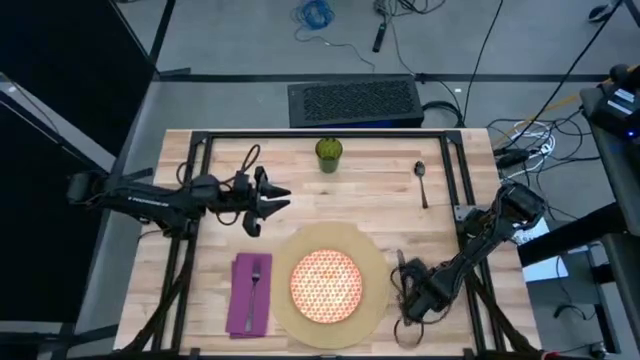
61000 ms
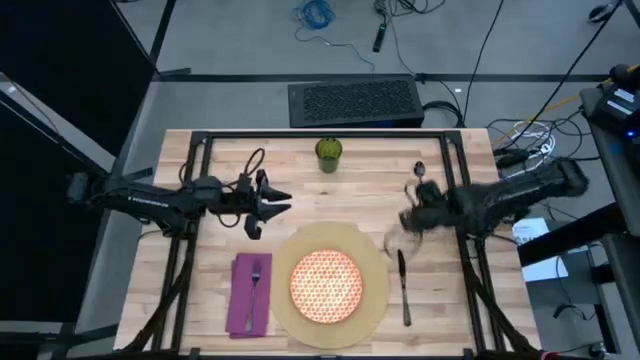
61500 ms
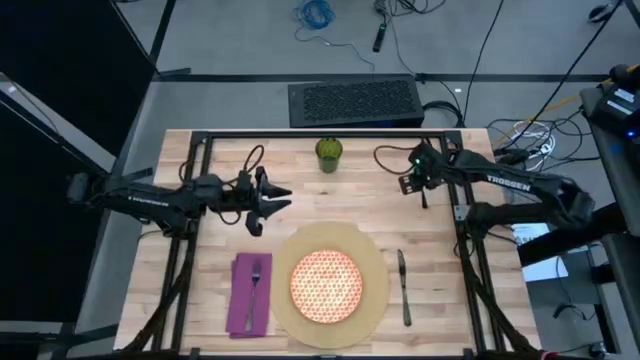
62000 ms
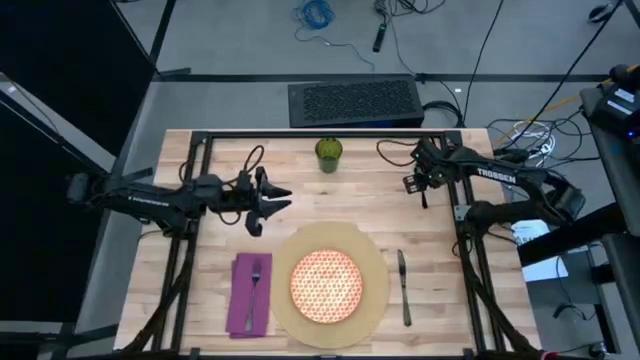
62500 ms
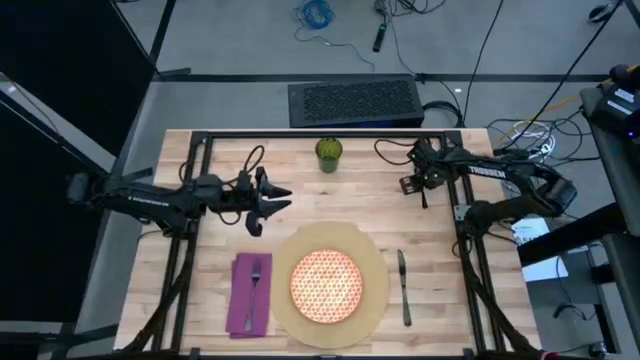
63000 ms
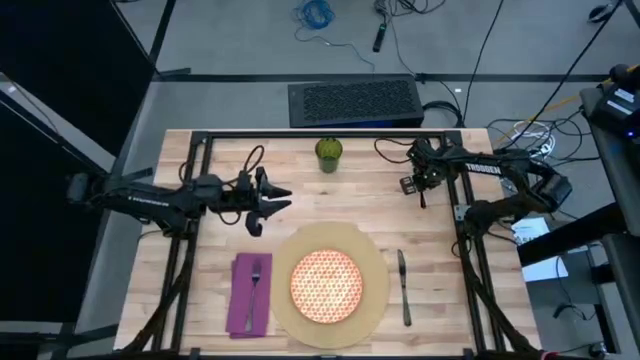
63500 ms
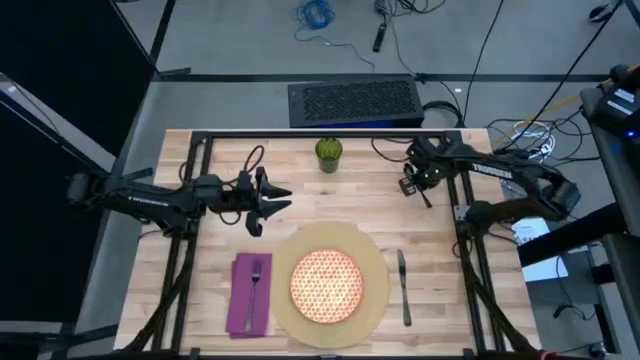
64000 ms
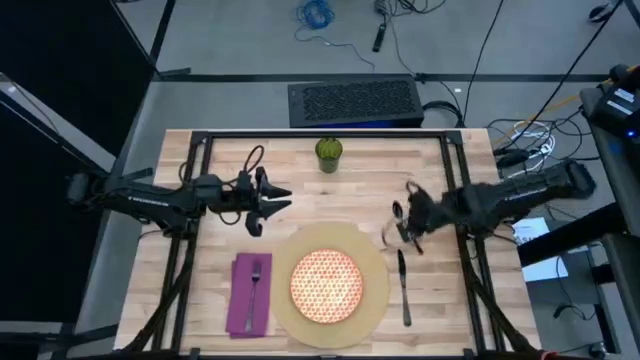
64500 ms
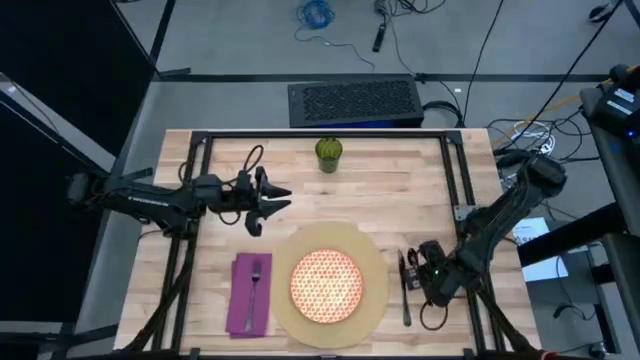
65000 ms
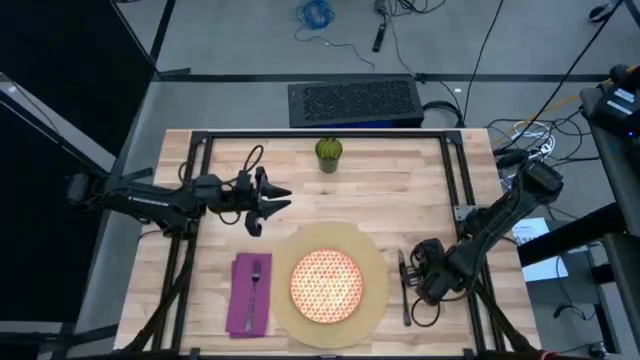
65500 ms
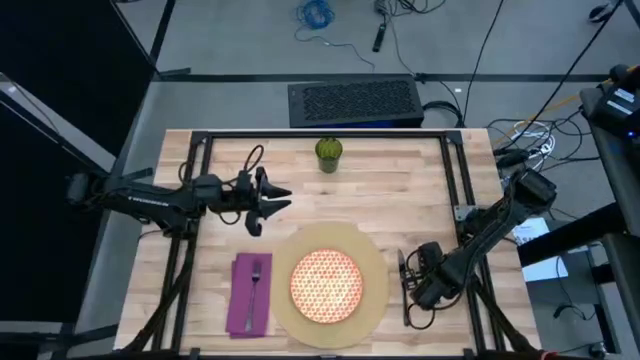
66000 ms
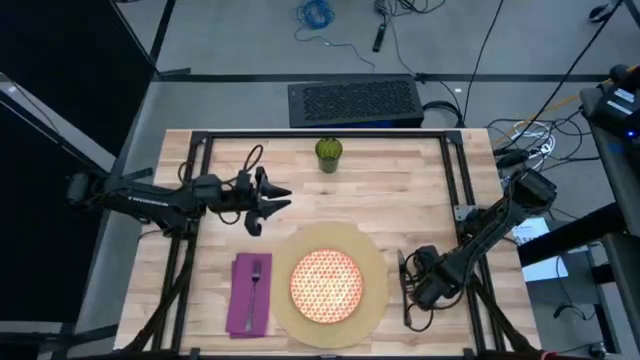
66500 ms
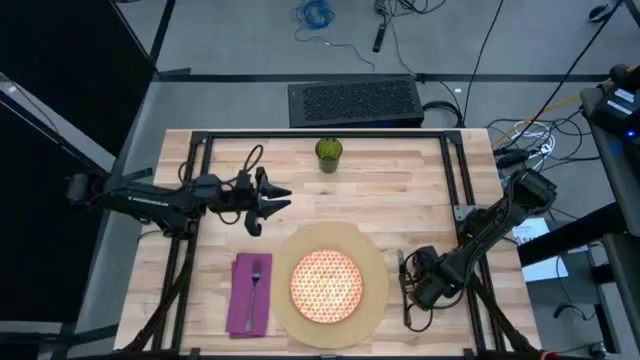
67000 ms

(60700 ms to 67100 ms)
Task: Set table place
Move the black spoon to the right of the black knife

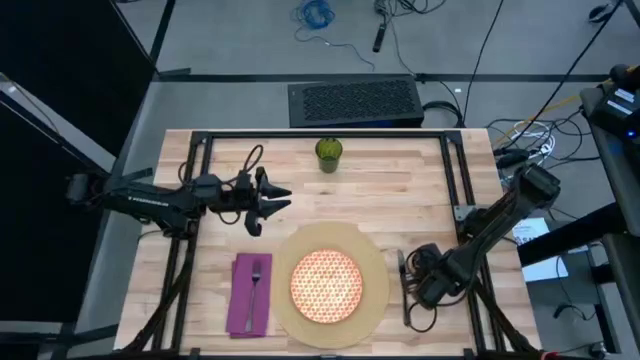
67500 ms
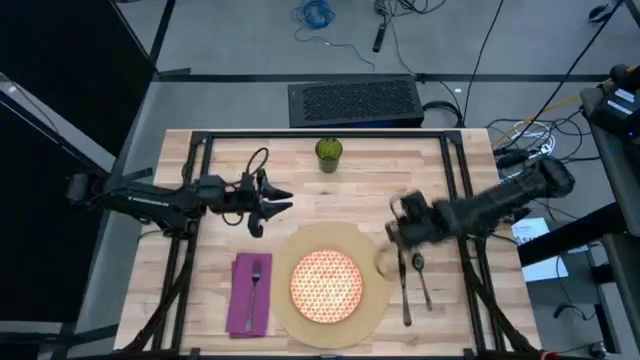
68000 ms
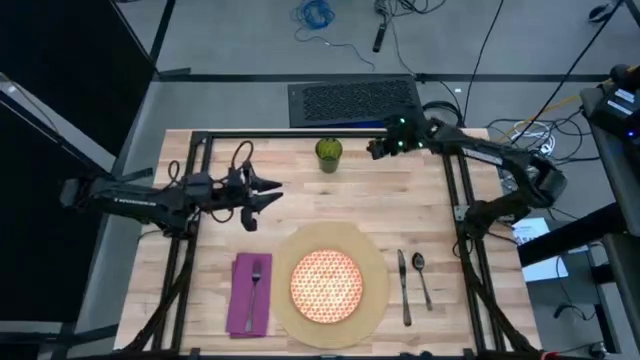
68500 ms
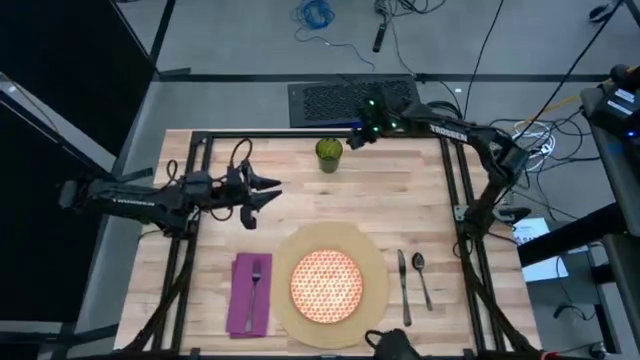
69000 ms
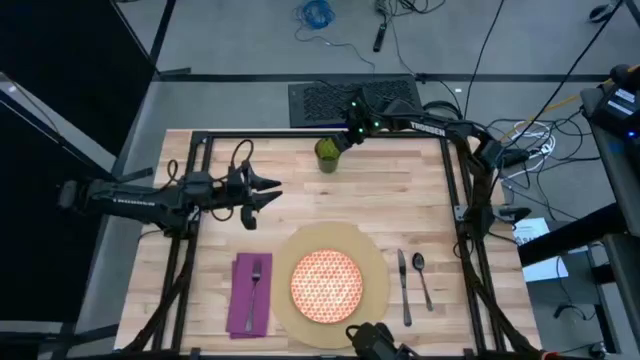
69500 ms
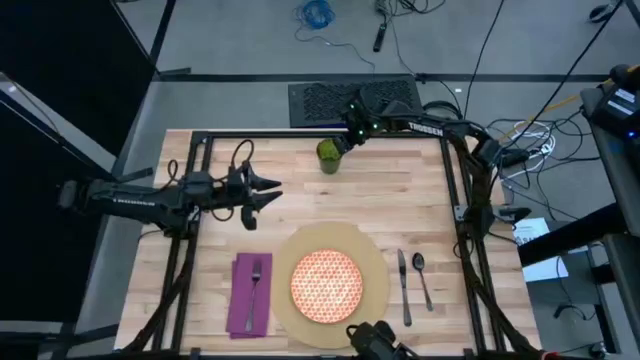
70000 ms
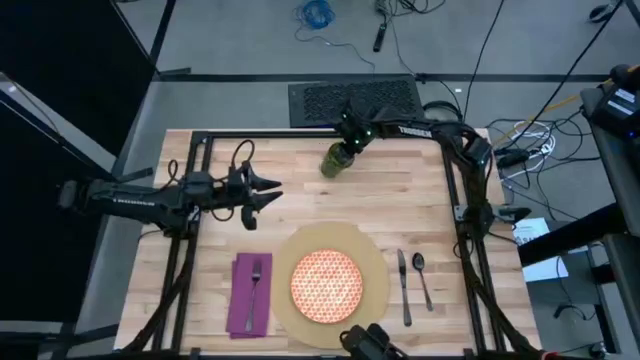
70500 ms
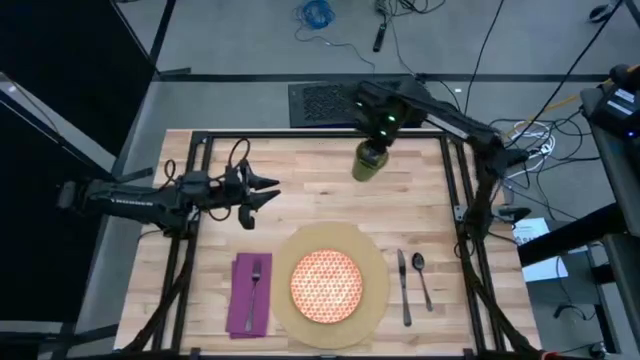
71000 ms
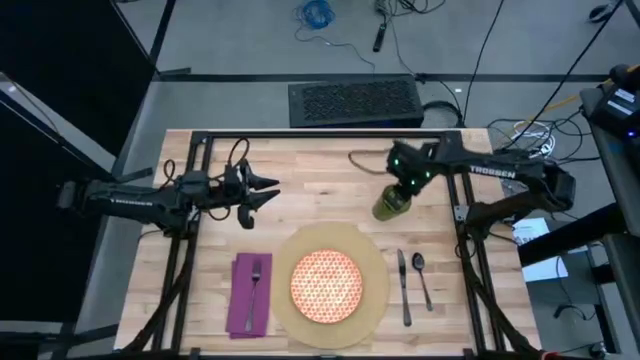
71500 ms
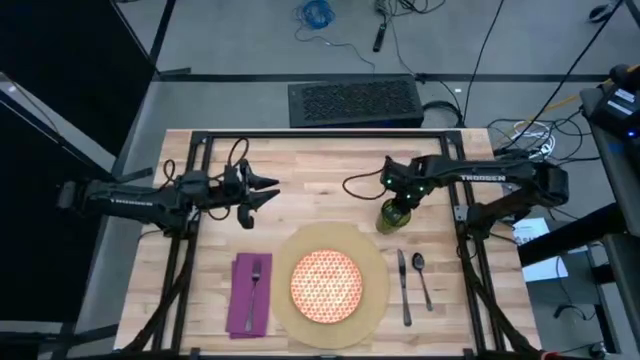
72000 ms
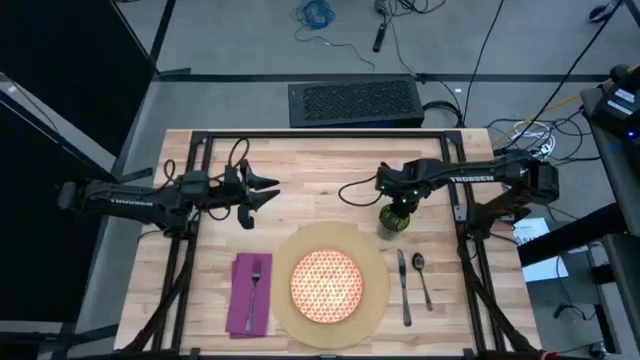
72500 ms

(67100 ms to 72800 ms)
Move the green glass to the top right of the brown placemat

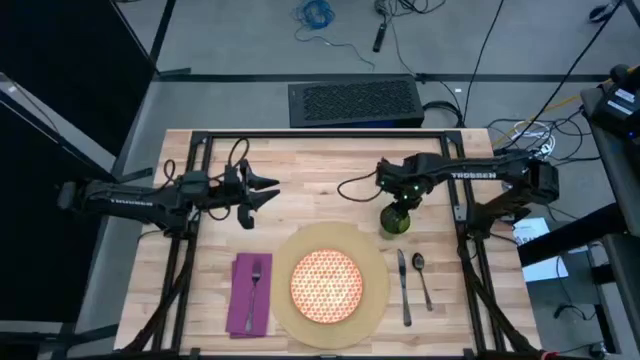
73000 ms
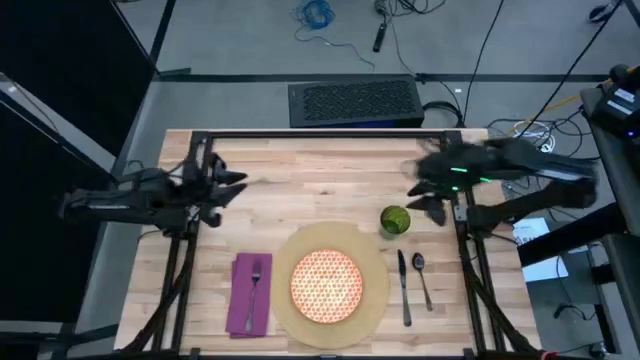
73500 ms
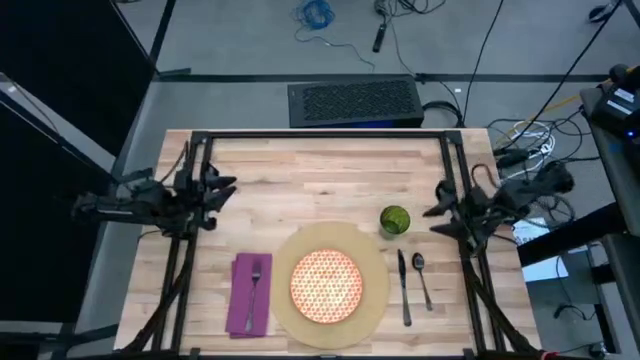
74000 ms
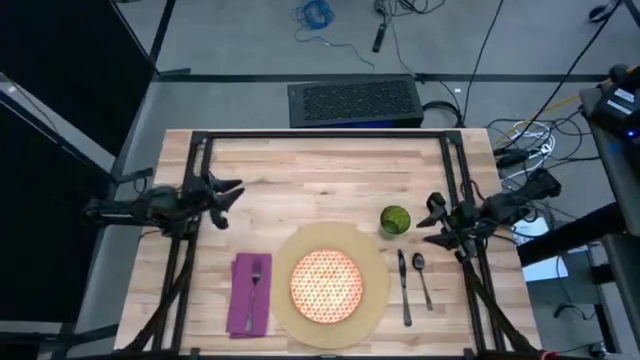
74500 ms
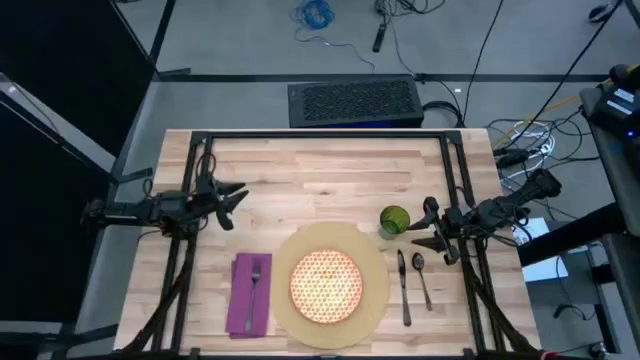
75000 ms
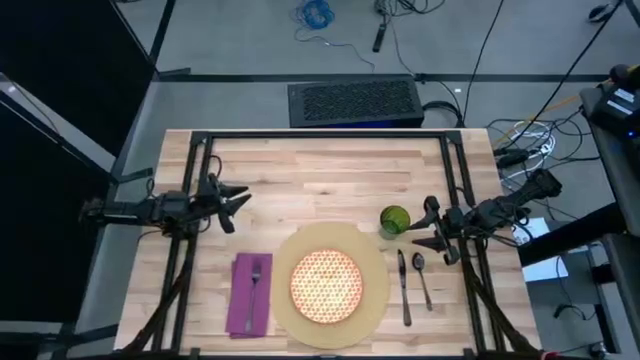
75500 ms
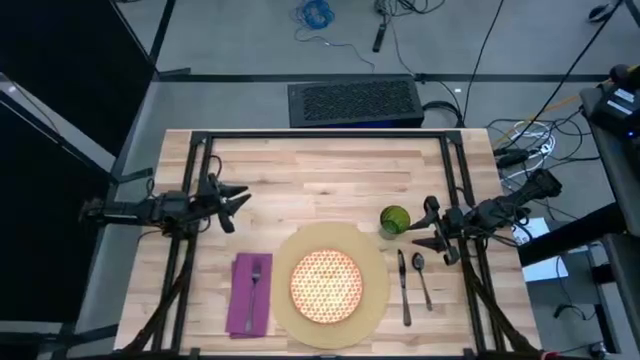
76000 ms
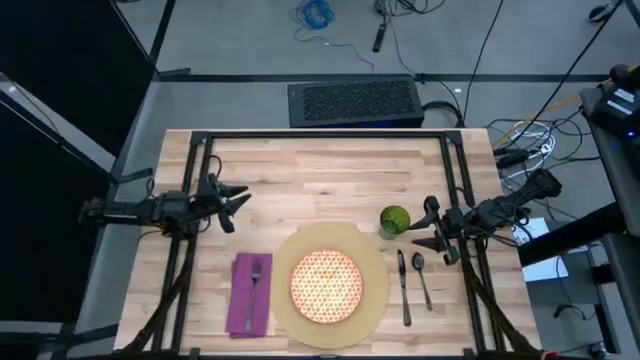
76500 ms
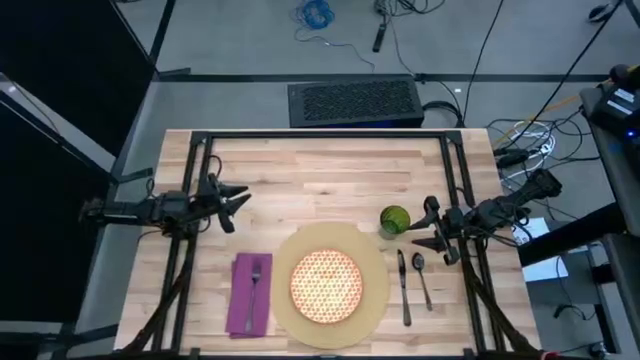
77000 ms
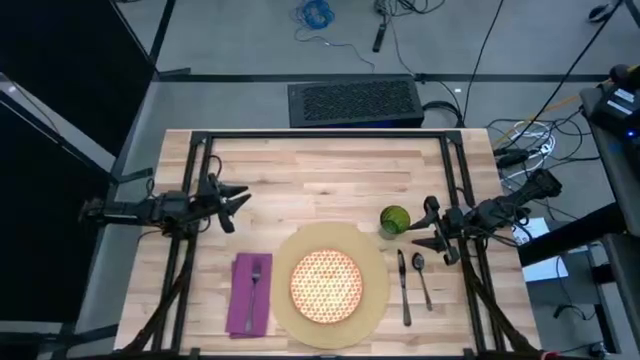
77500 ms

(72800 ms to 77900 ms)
Return to Home Position

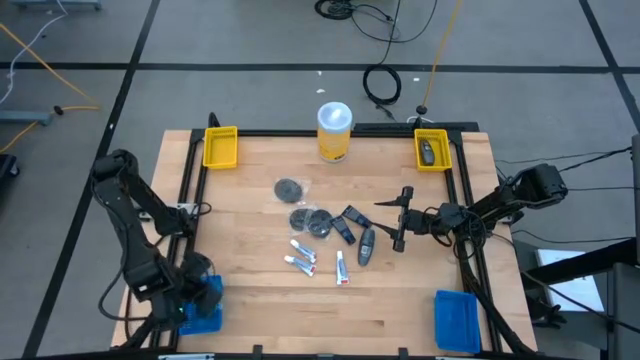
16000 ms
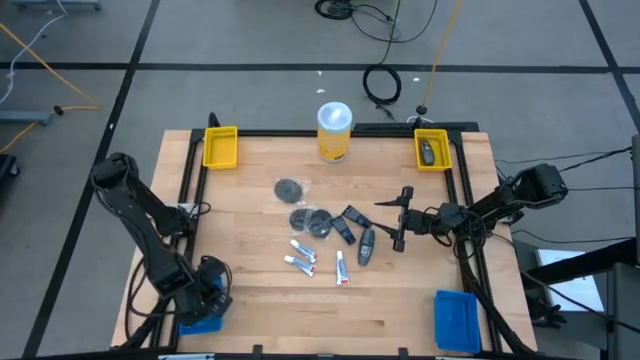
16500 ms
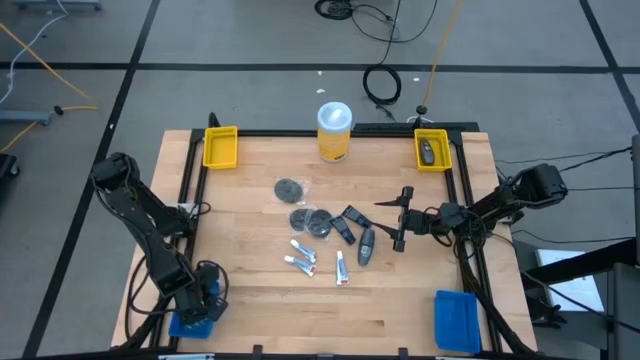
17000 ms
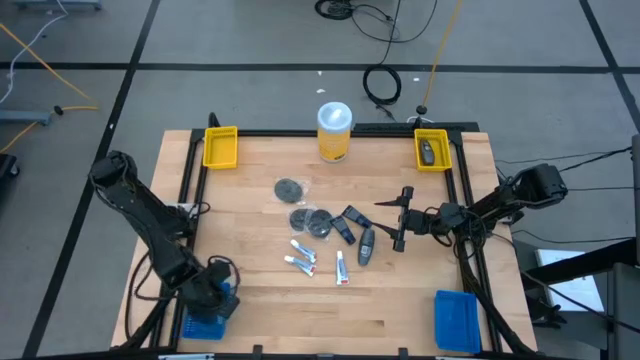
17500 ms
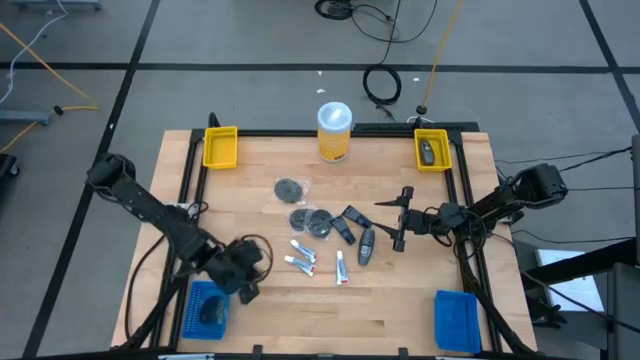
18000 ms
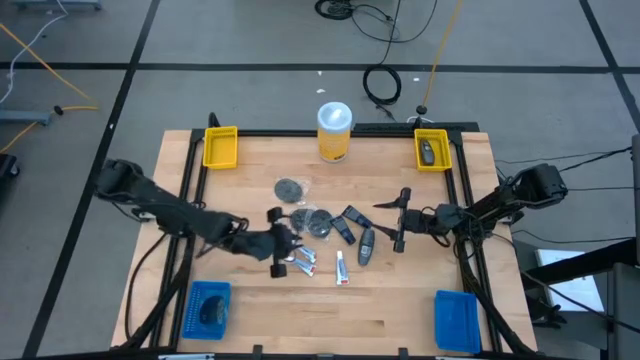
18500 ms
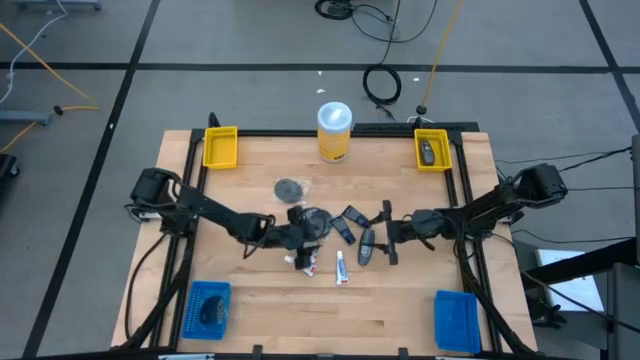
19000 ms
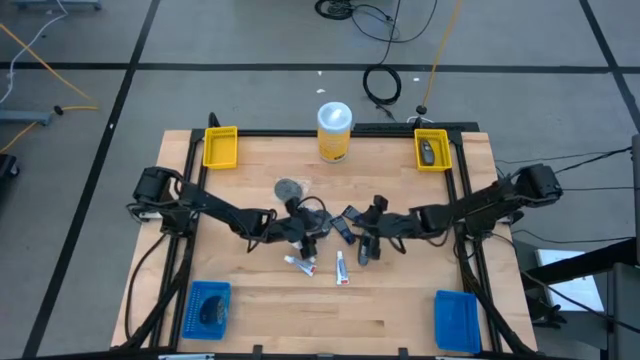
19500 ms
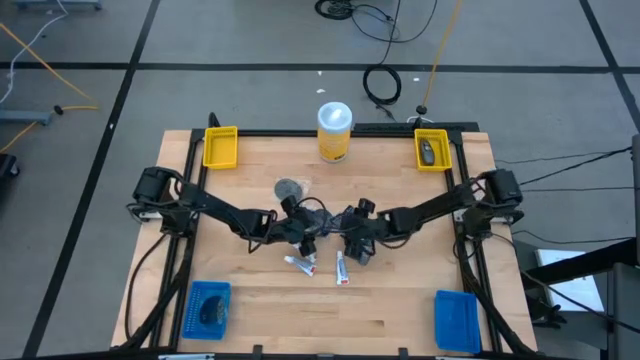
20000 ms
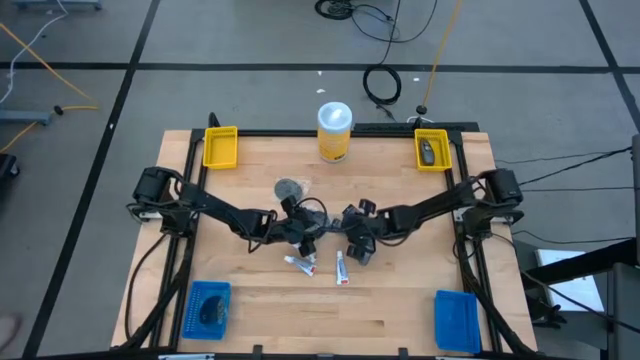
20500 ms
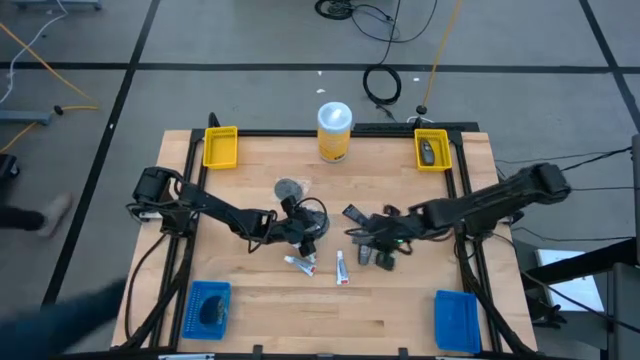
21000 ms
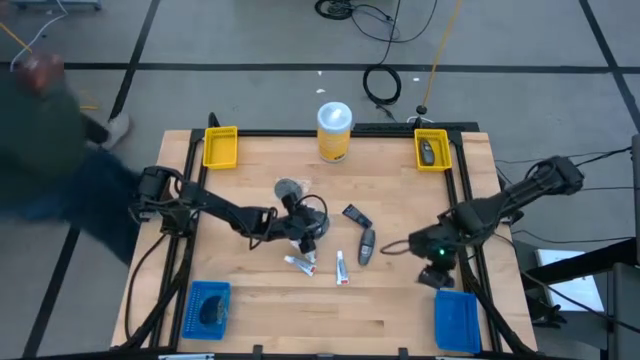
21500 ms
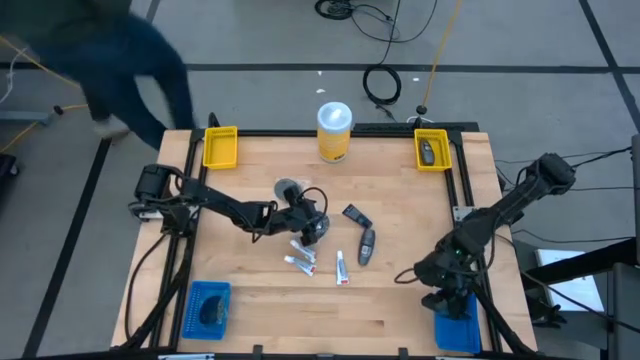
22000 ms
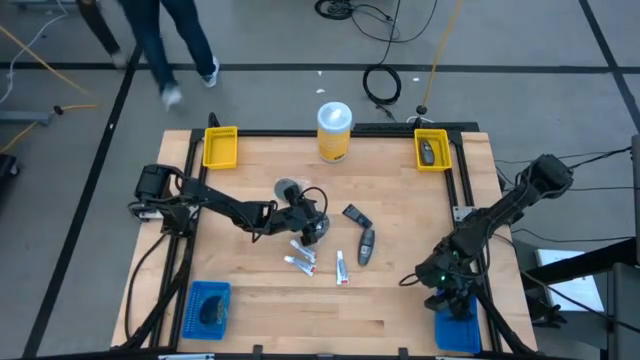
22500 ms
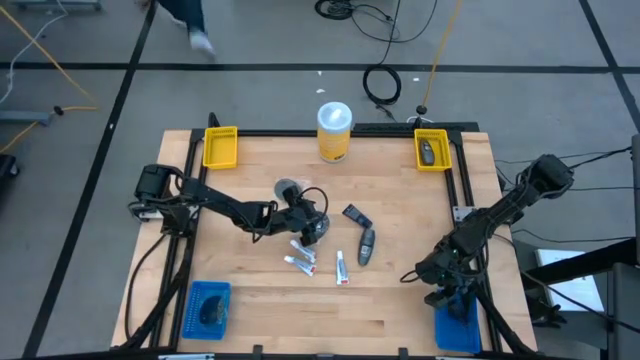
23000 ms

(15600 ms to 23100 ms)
Task: Pick & Place Travel size toiletries
Put the left blue shave cream into the right blue bin
